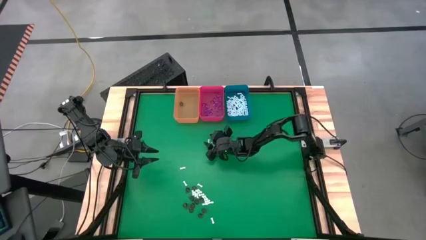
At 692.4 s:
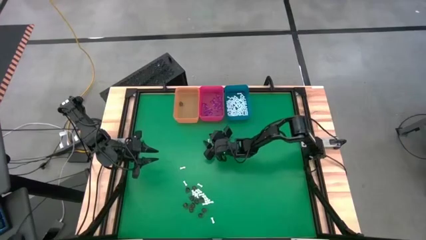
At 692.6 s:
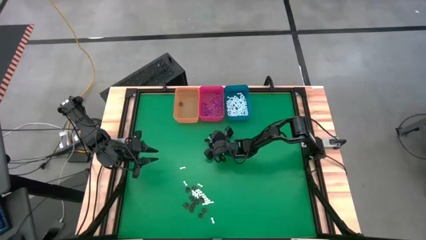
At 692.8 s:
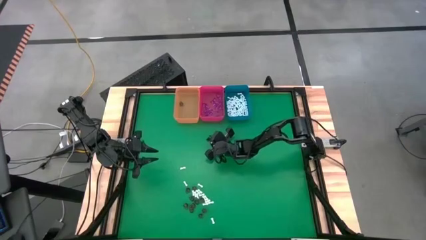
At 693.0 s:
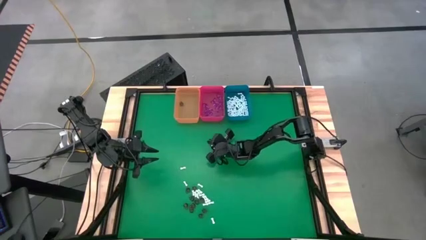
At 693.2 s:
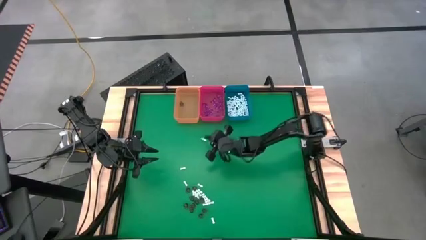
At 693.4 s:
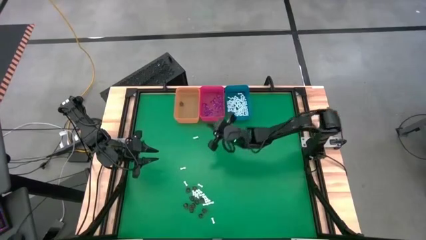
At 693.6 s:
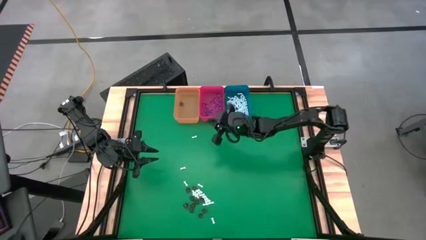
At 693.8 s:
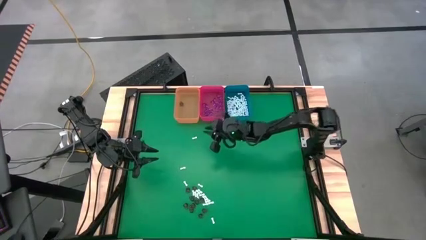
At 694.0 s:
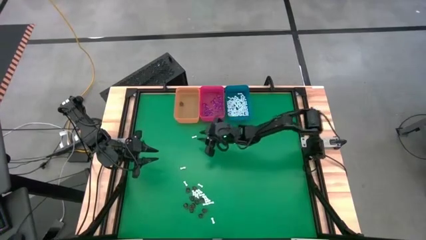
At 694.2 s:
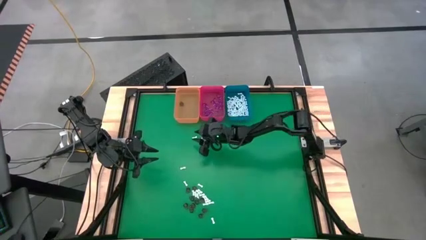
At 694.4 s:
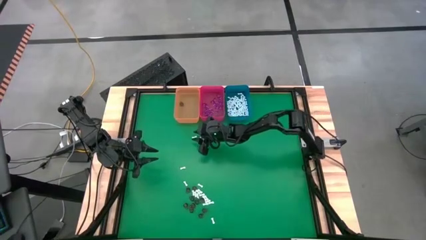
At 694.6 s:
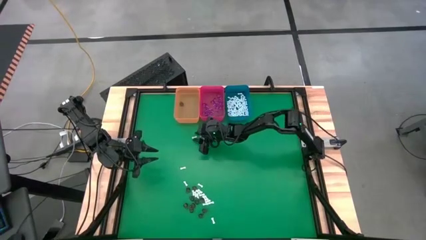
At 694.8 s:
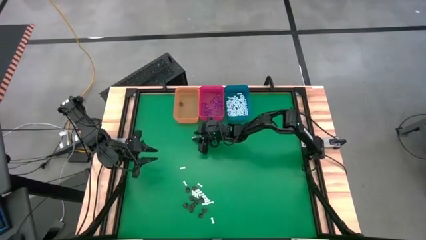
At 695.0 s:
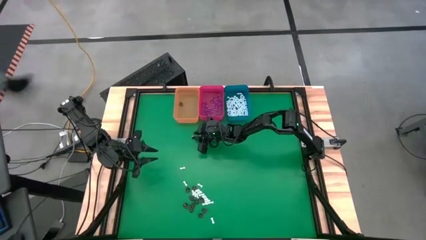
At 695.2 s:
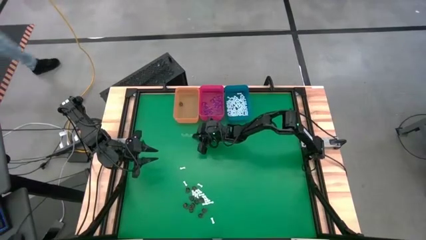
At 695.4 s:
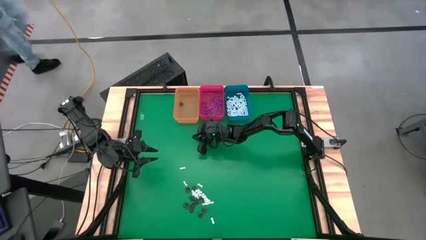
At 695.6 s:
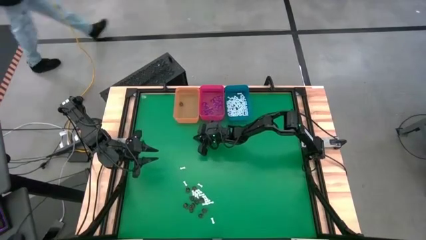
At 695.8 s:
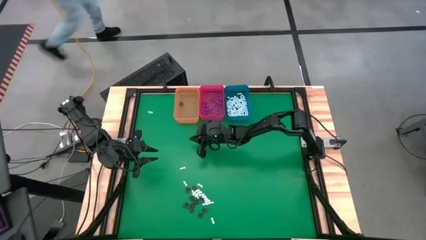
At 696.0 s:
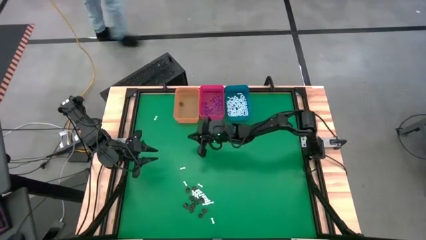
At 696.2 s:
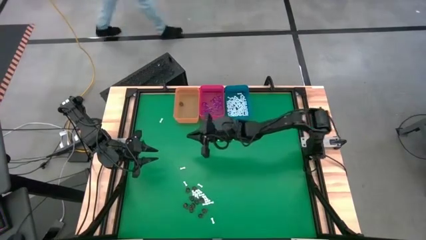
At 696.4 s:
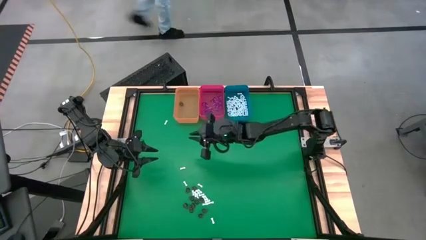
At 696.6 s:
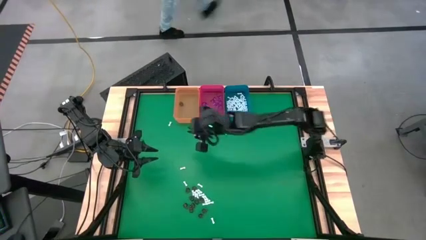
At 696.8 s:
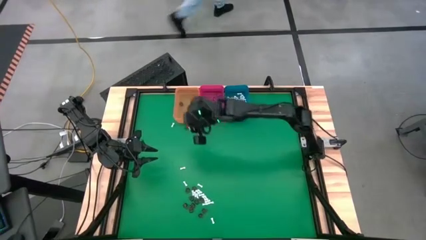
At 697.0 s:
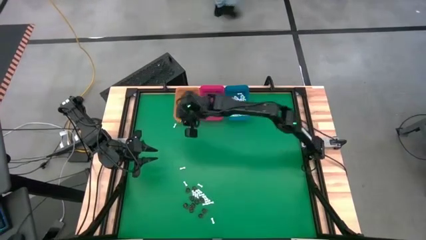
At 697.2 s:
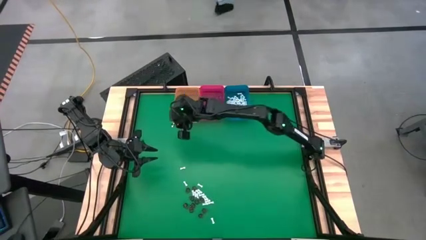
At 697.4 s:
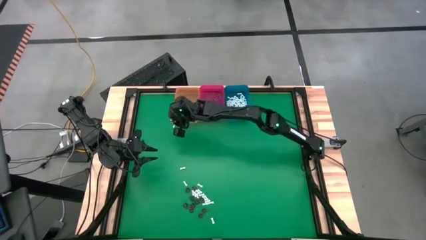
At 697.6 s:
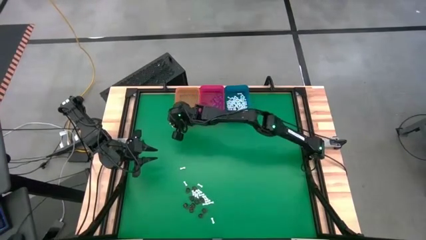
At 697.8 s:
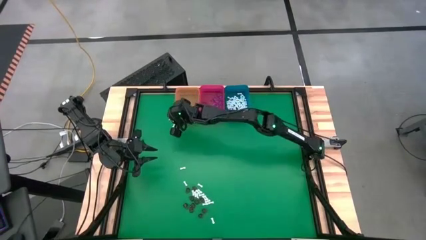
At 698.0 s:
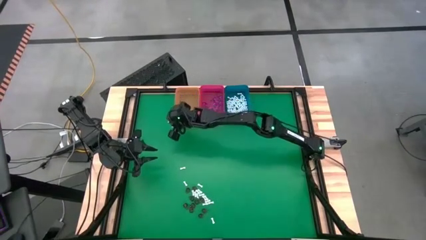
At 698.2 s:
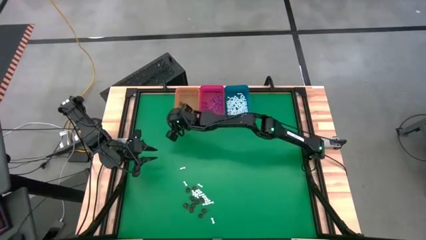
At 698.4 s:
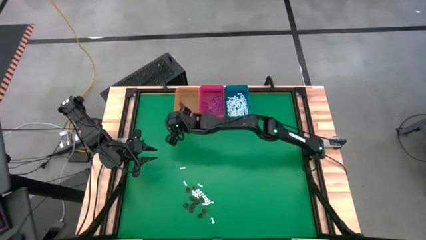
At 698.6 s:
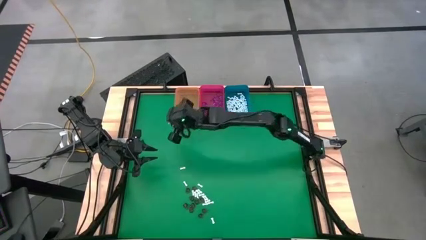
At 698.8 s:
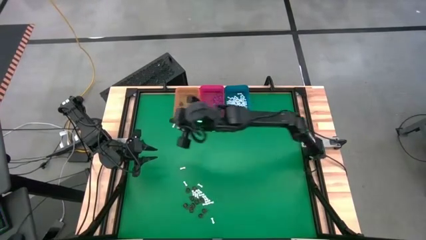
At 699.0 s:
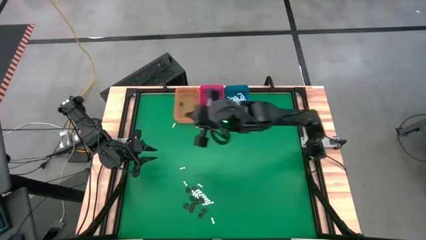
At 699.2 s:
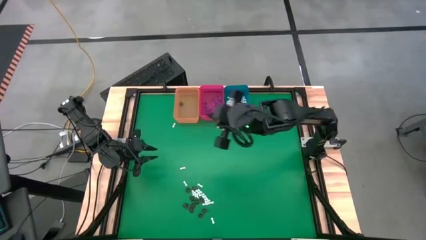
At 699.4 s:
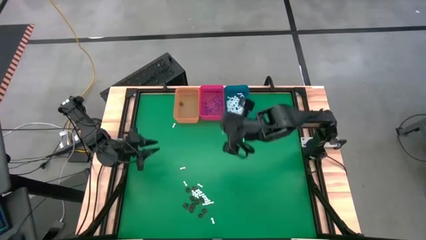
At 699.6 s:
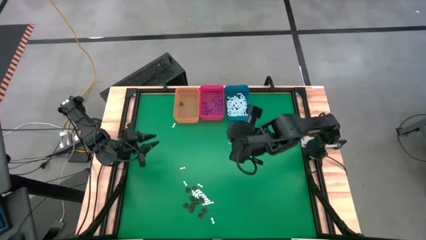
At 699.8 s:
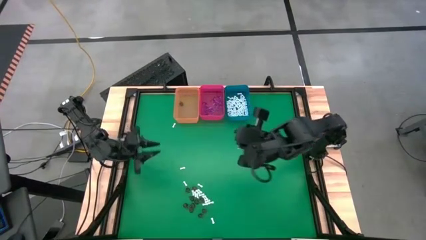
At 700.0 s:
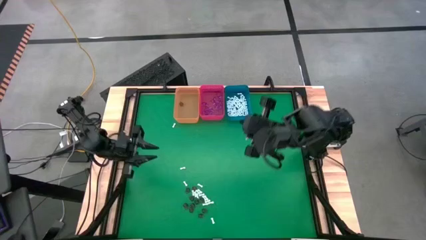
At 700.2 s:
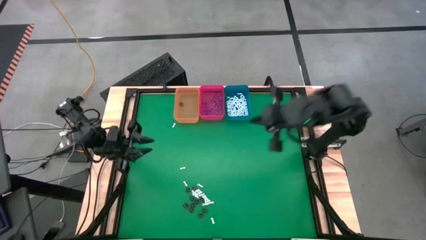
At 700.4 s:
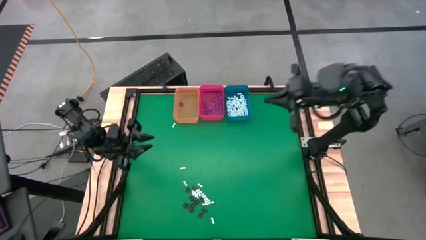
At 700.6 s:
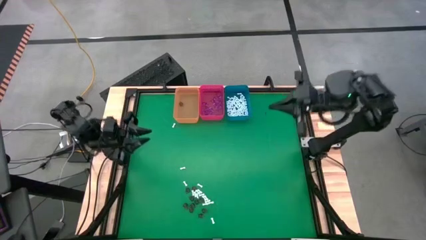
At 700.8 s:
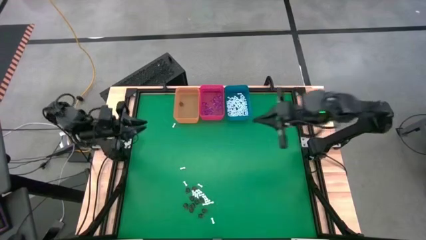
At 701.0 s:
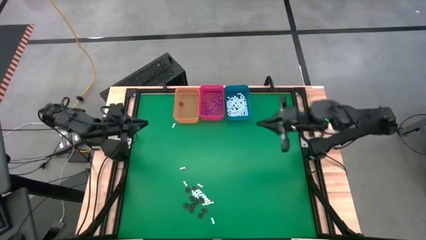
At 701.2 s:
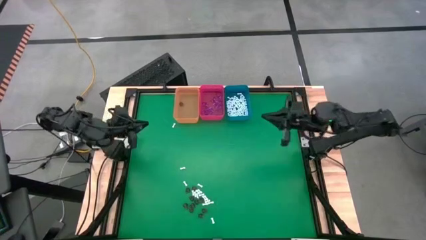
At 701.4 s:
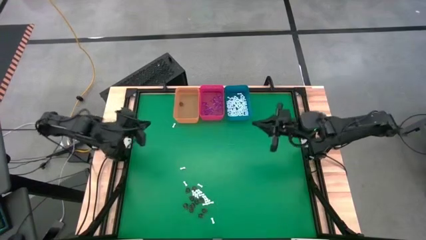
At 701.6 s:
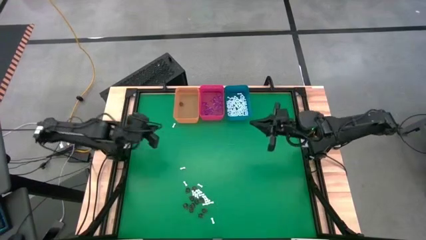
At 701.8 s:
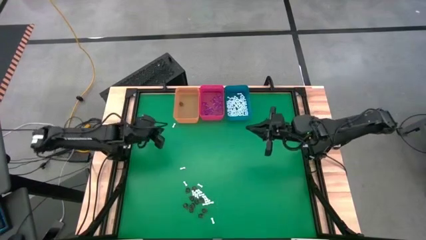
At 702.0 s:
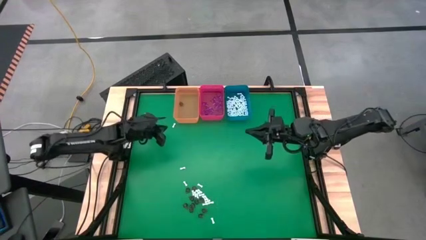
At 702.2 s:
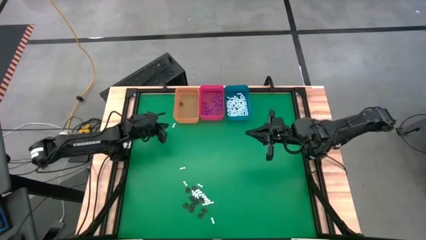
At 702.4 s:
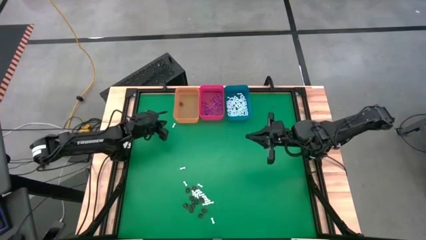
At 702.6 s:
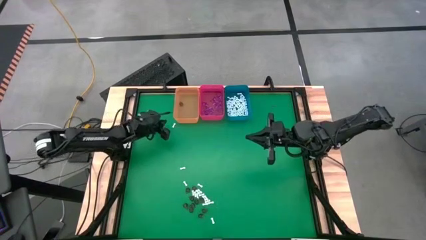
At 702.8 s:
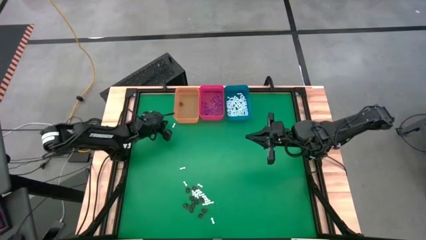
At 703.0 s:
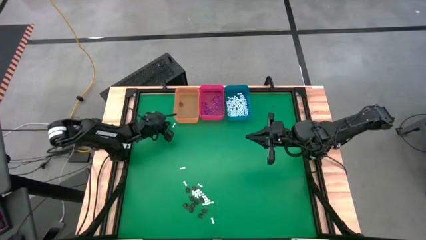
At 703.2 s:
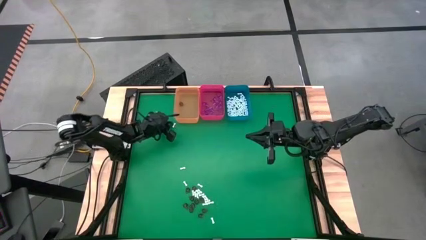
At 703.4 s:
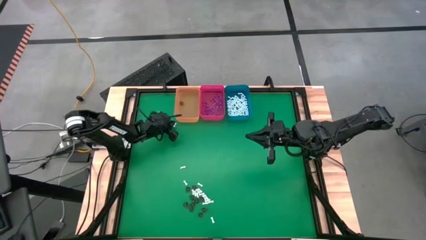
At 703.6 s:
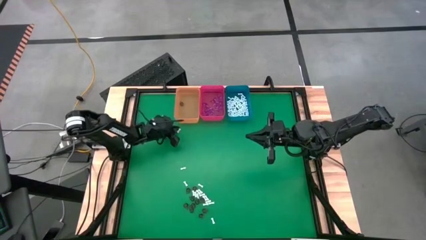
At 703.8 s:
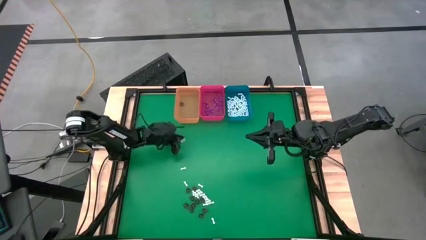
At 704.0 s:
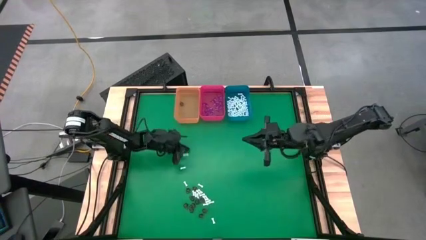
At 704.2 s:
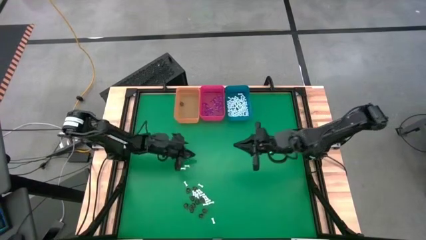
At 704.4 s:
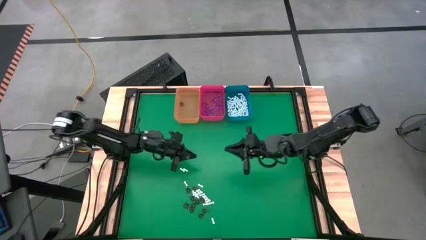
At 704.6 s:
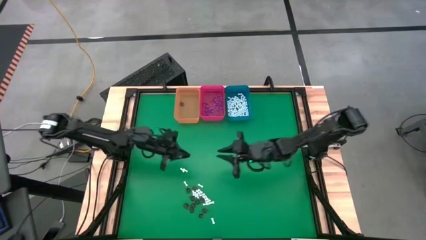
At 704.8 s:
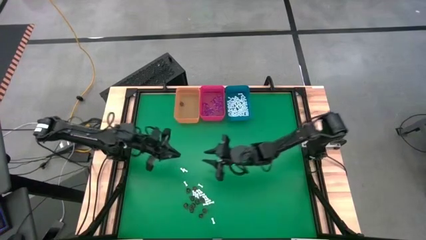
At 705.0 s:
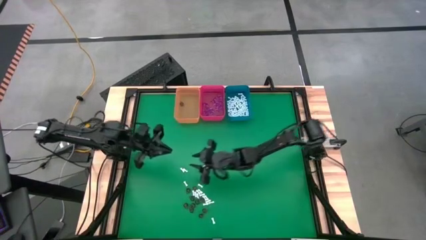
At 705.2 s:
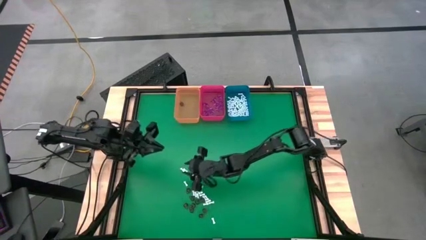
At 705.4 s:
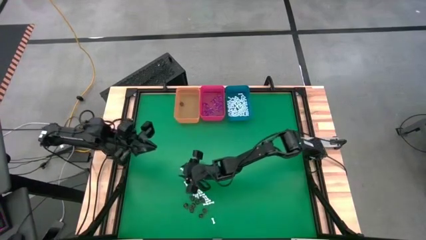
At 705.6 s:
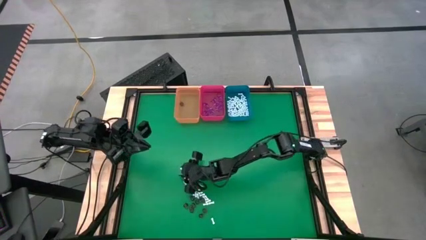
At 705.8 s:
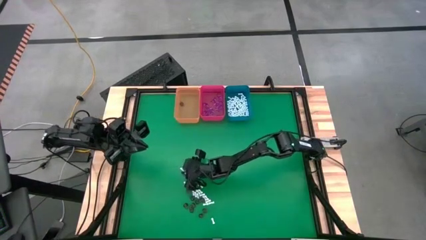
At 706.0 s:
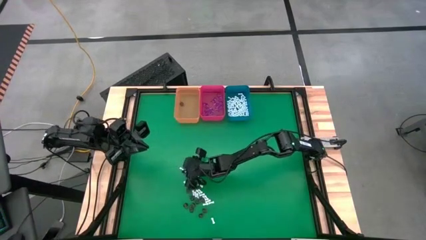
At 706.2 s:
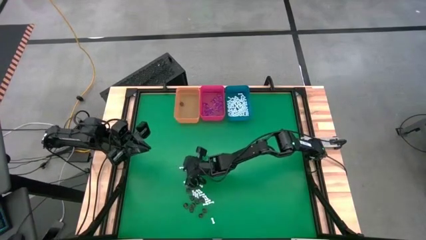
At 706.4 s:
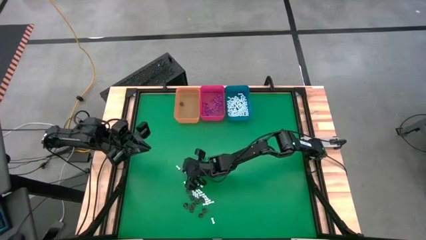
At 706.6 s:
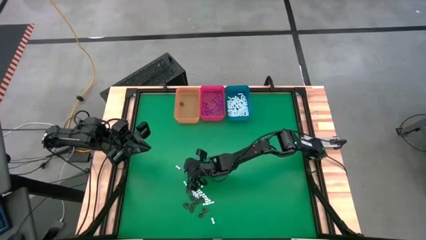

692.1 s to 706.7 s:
Task: Sort Halloween decoration
Put the white bone toy into the blue bin

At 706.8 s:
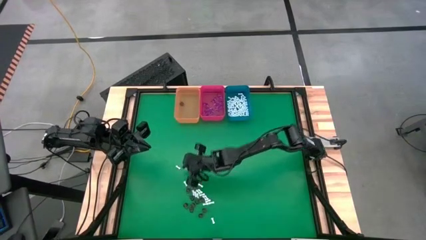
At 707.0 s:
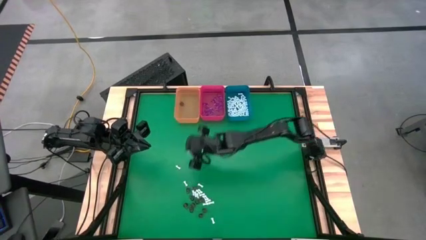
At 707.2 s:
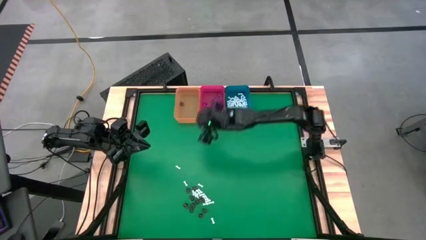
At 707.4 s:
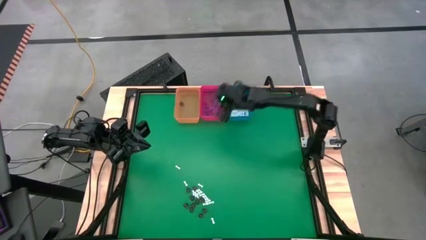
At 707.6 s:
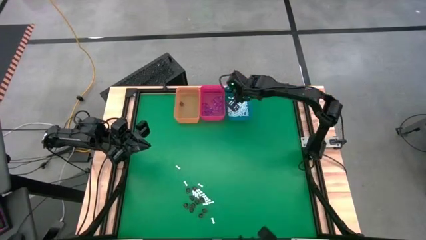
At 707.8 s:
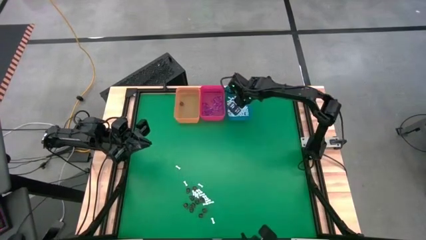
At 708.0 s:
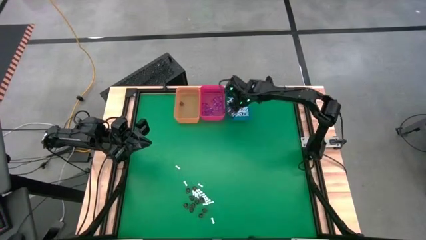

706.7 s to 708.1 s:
Put the white bone toy into the blue bin

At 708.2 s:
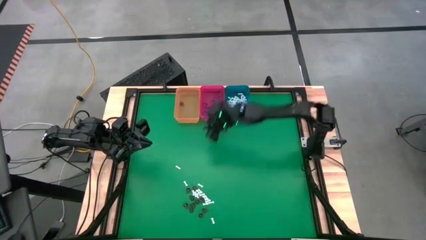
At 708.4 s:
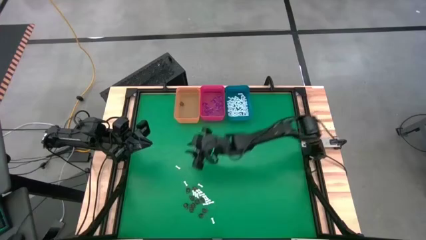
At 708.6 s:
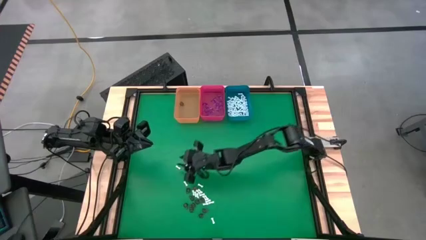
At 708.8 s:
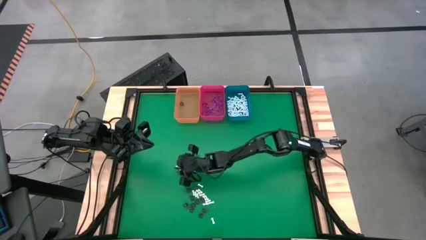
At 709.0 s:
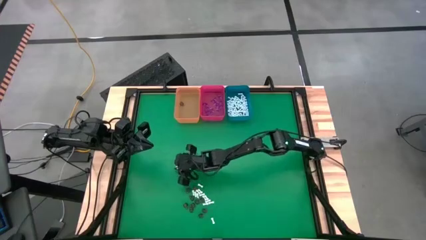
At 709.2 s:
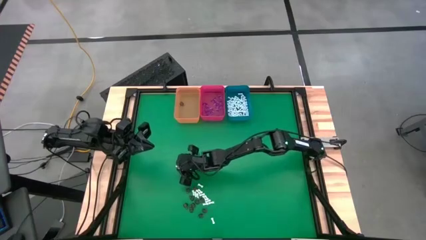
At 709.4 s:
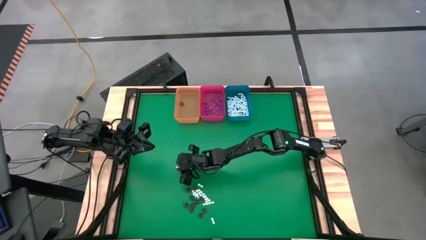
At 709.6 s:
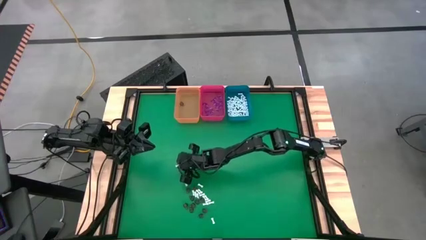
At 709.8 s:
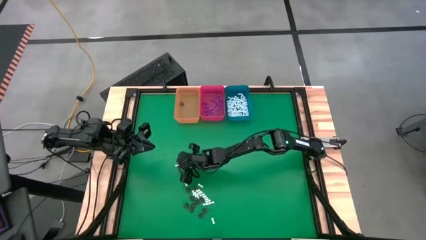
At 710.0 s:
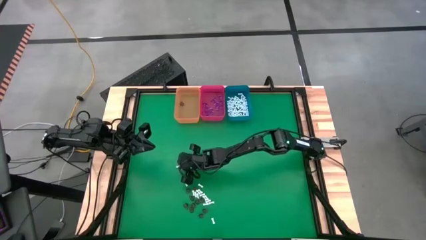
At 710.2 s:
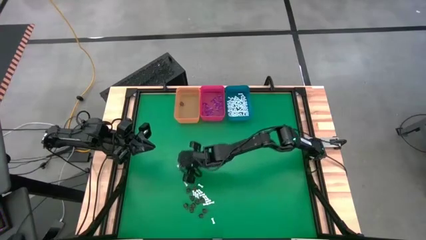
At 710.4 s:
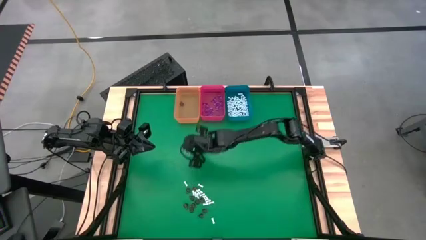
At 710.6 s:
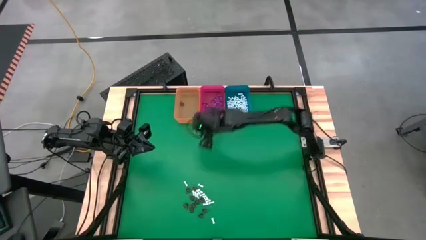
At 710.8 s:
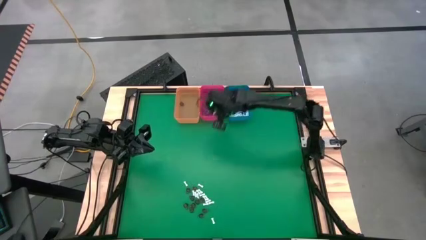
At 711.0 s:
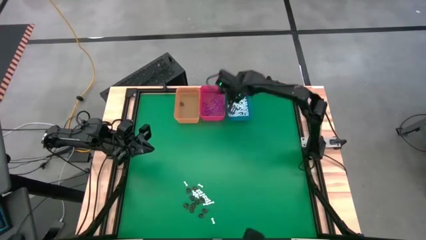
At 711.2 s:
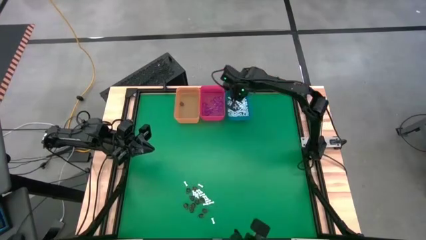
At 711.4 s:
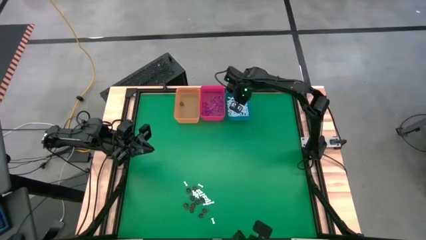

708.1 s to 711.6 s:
Put the white bone toy into the blue bin
